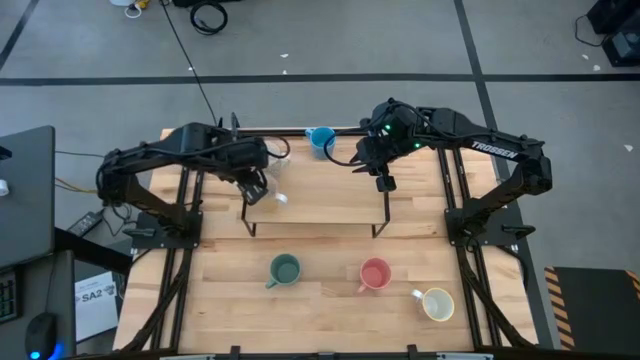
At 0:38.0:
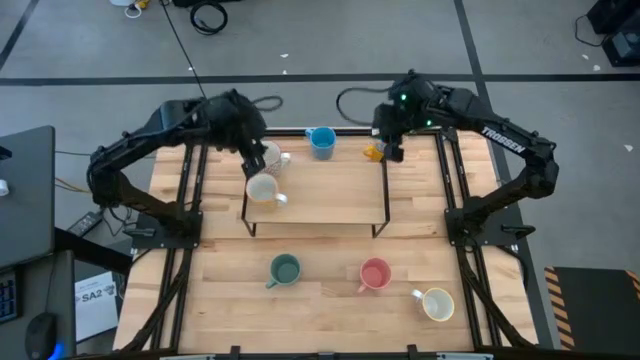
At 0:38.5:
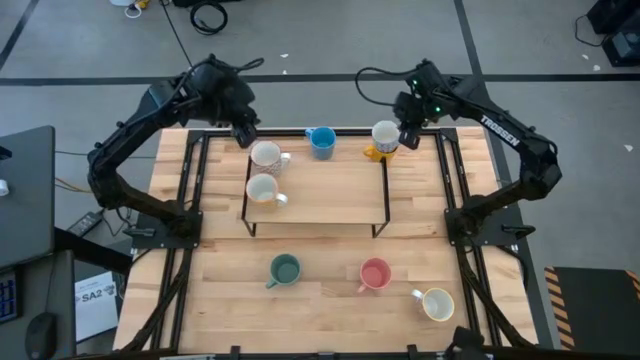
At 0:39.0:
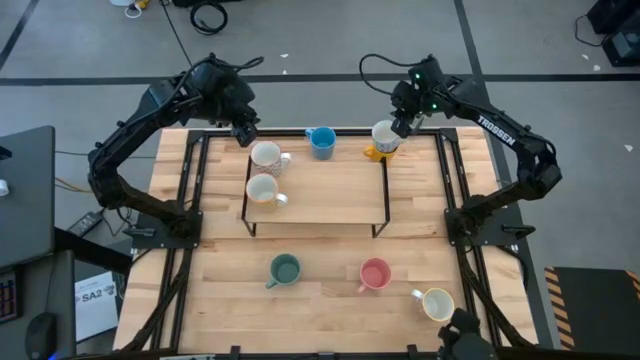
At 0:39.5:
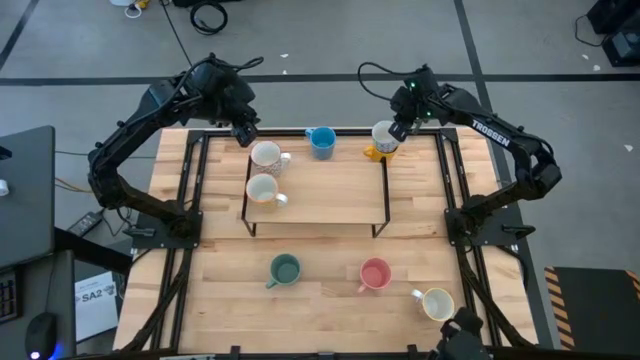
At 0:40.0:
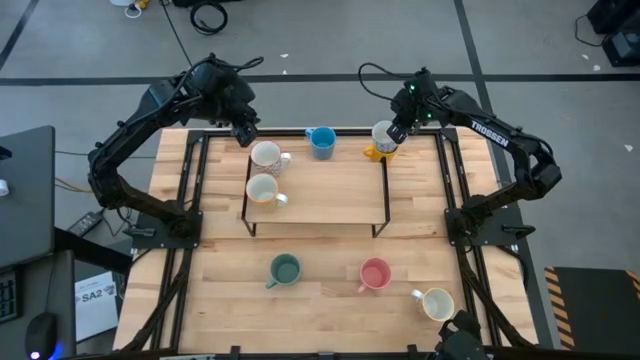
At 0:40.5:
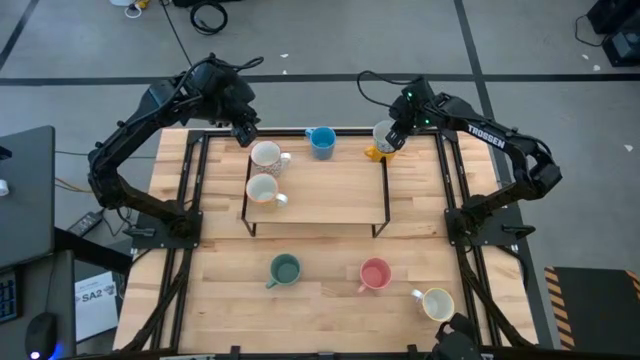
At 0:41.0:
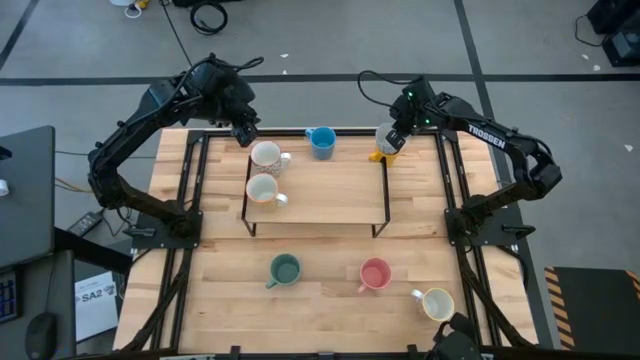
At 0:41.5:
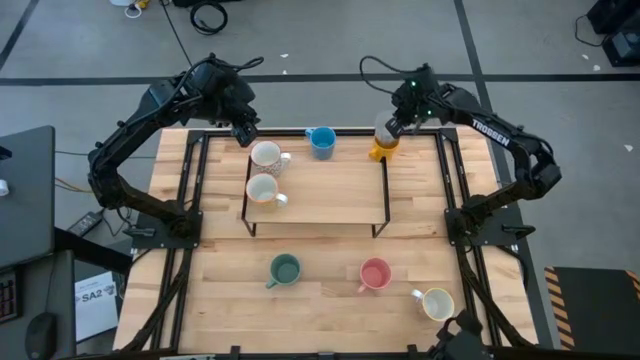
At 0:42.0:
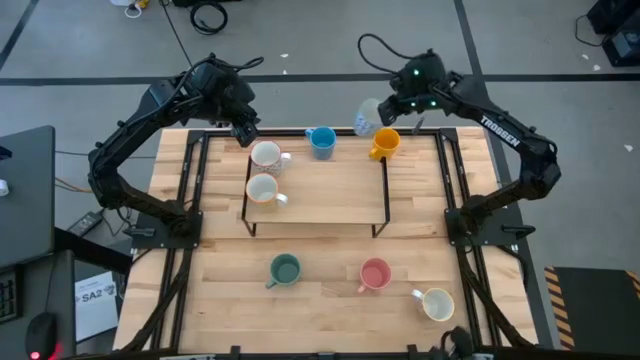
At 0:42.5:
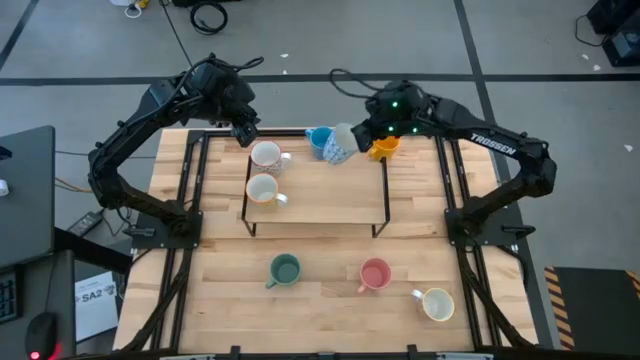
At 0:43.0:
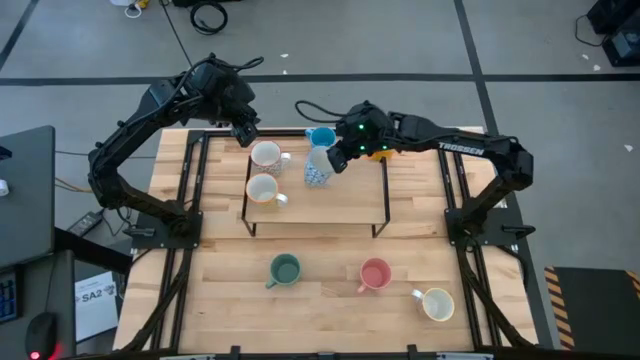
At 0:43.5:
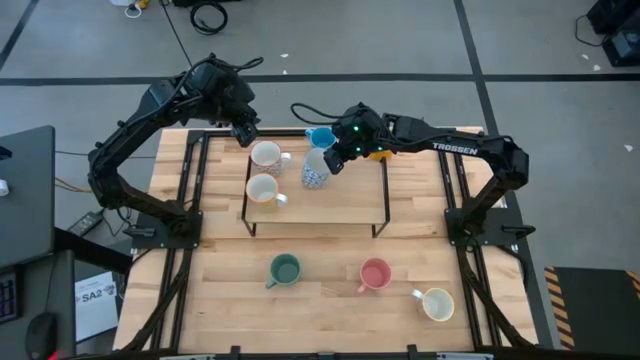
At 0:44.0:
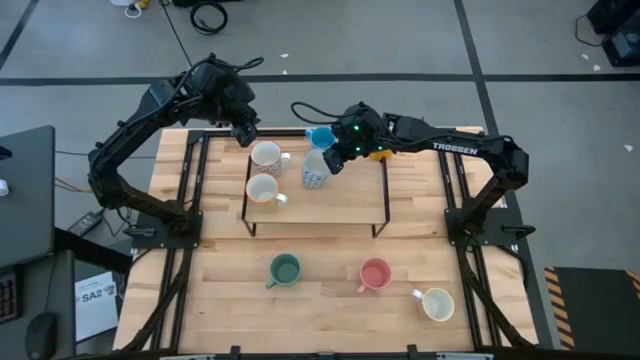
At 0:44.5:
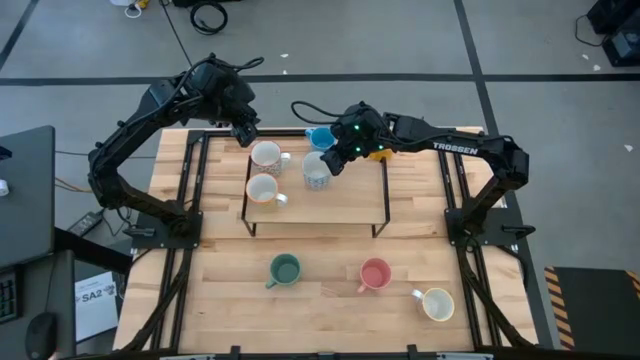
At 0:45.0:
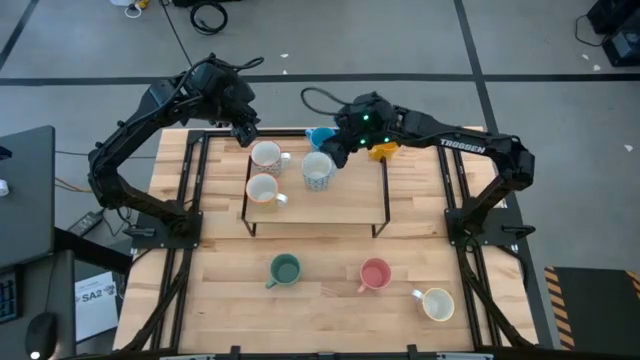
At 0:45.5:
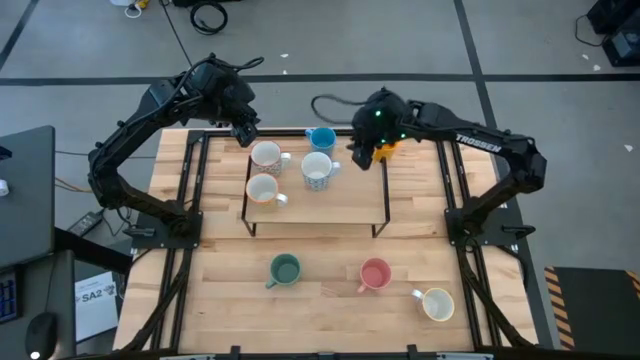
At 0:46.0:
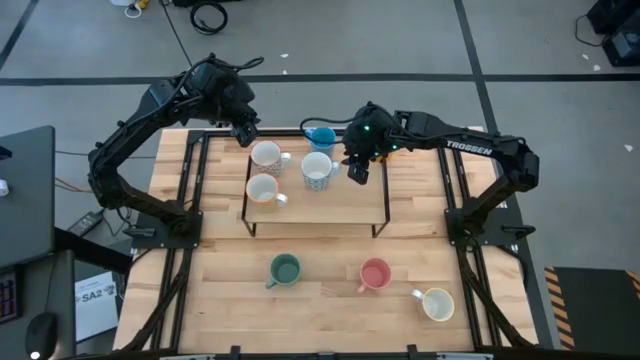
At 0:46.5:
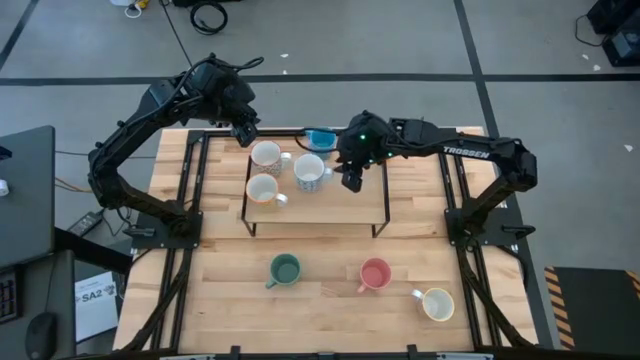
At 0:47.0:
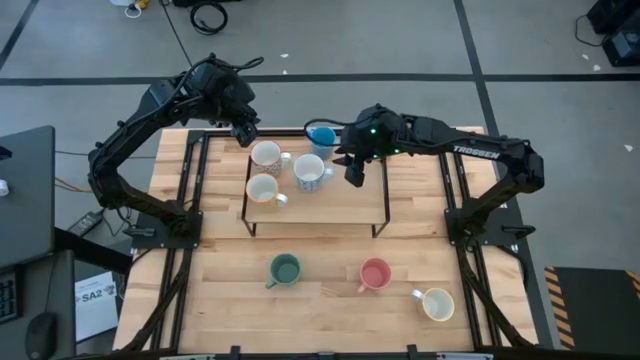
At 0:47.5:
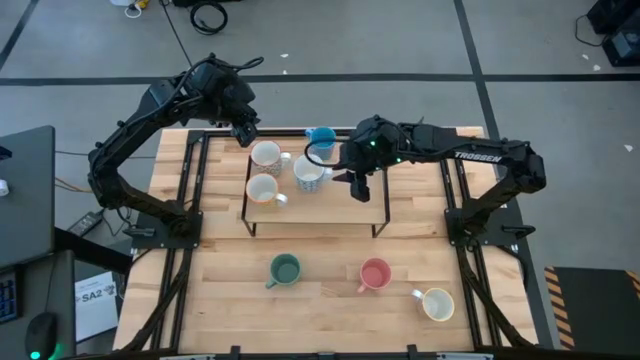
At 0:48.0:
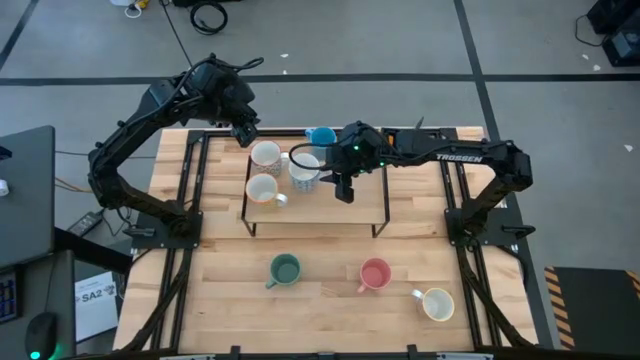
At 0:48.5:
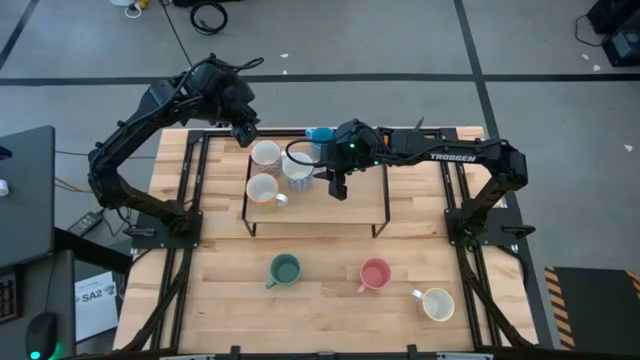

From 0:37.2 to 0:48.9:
Task: Place coffee mugs
Put the blue patterned mug on the shelf

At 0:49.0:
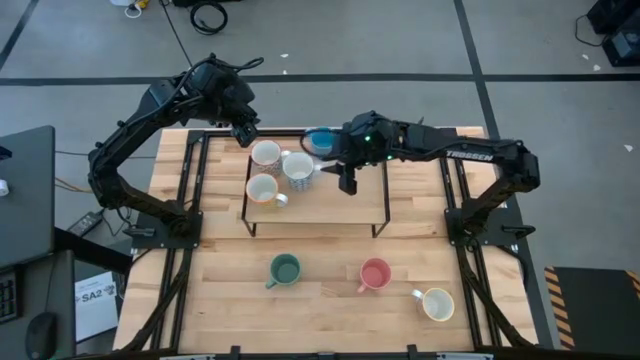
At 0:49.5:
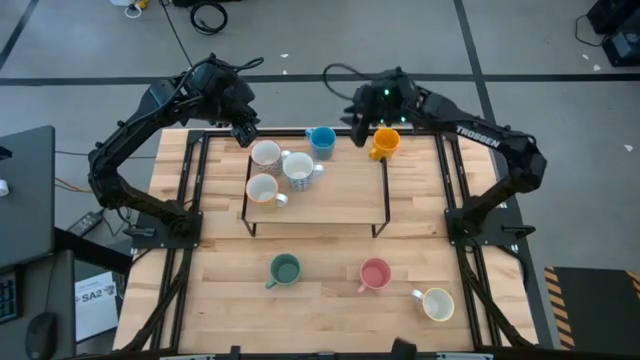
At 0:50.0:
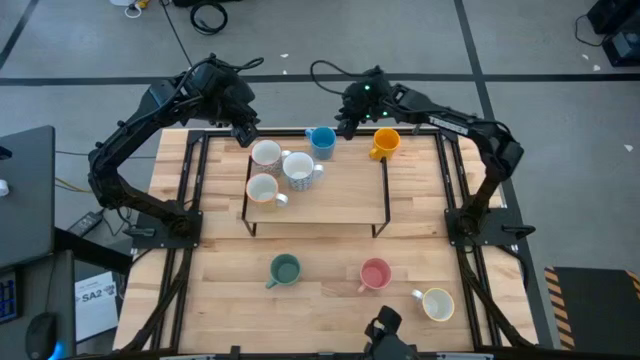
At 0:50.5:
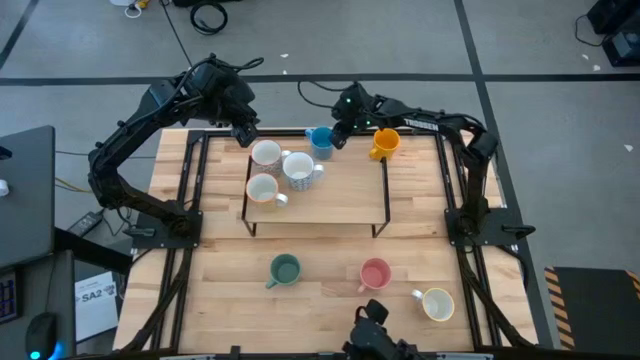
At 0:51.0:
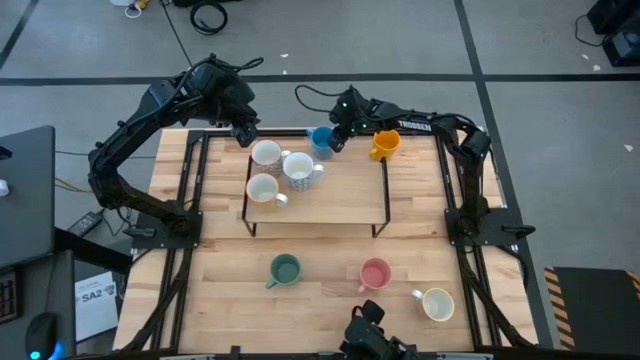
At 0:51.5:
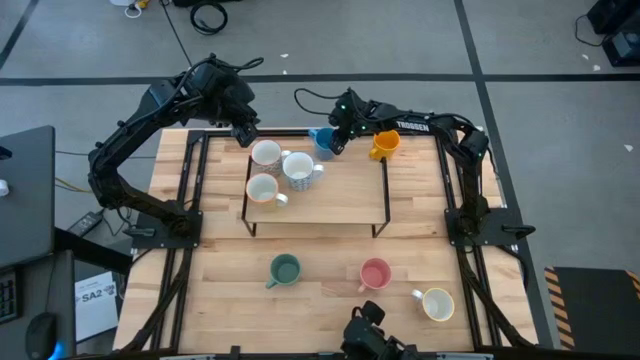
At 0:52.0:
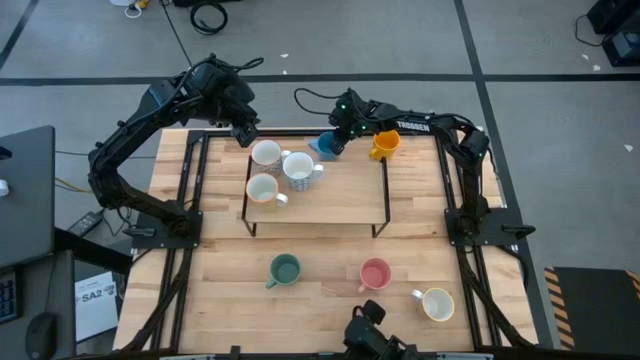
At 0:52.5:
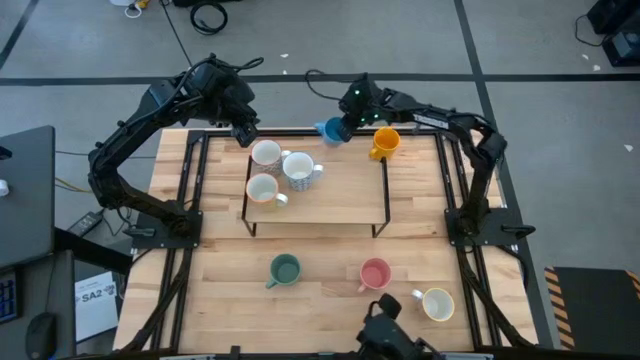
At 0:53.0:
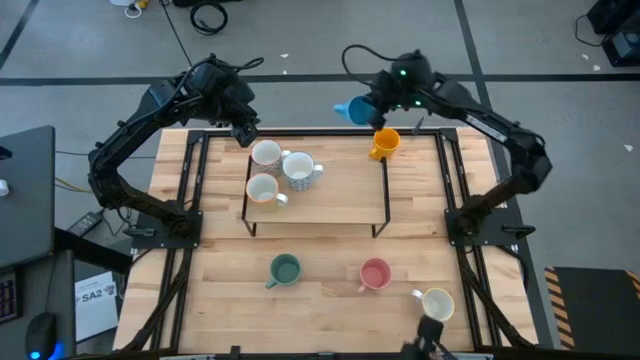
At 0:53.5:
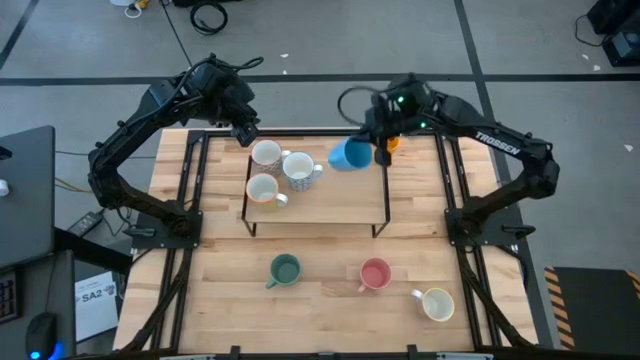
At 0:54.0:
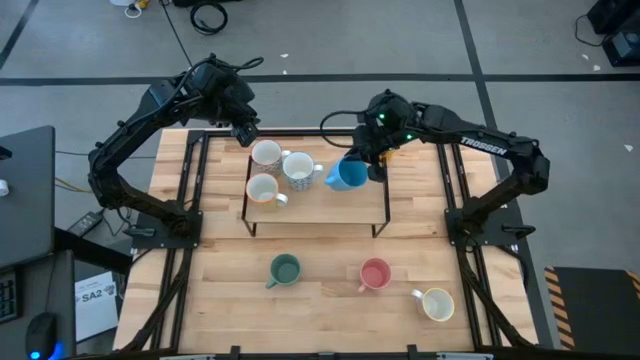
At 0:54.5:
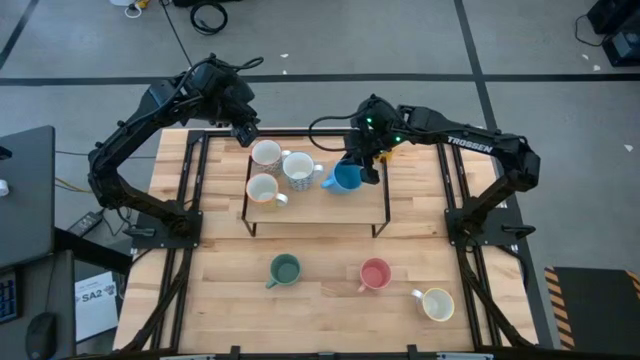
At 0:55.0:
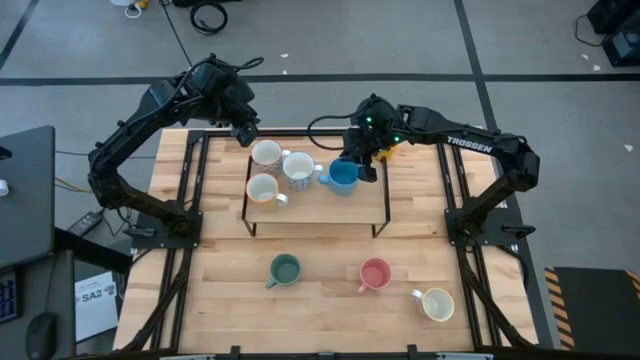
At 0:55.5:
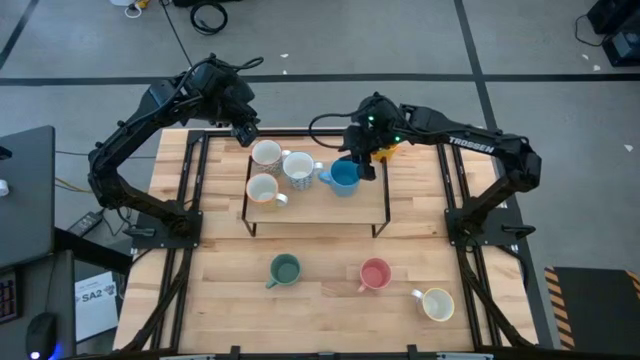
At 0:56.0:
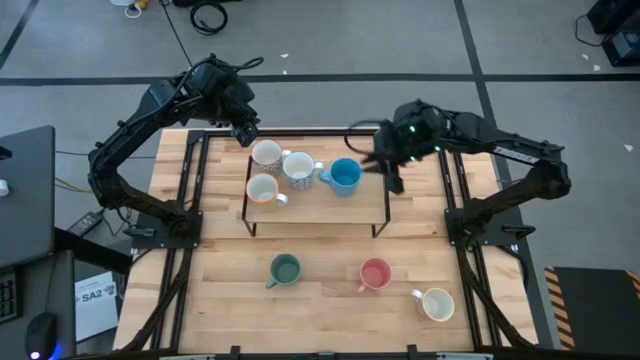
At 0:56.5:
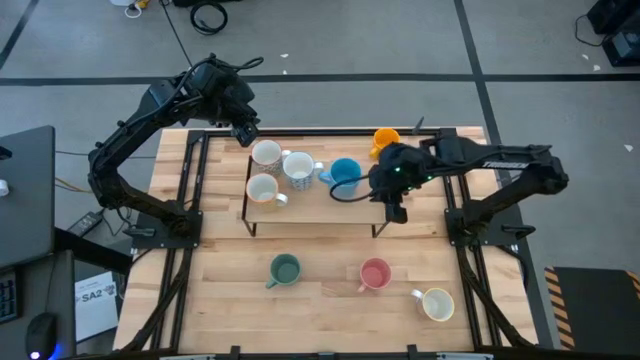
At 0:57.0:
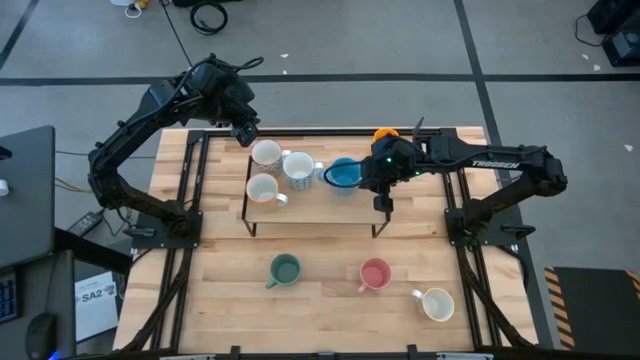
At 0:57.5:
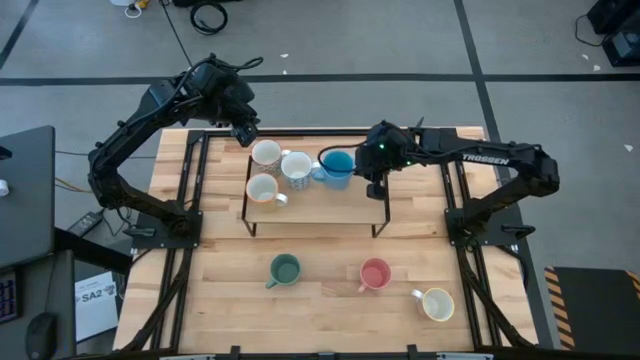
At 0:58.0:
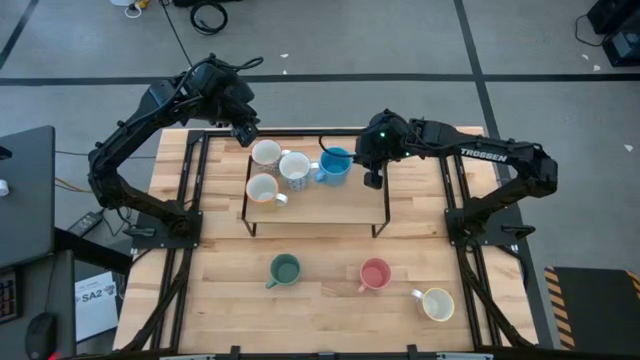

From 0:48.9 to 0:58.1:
Put the blue mug on the shelf
